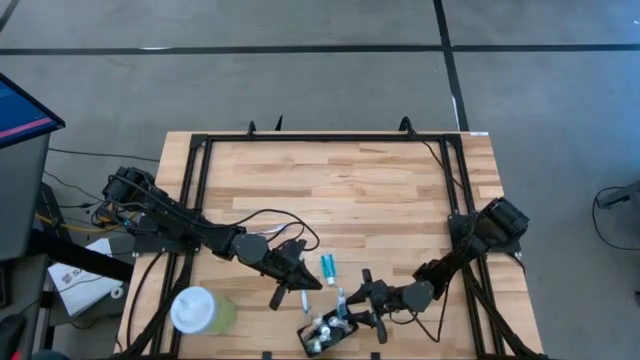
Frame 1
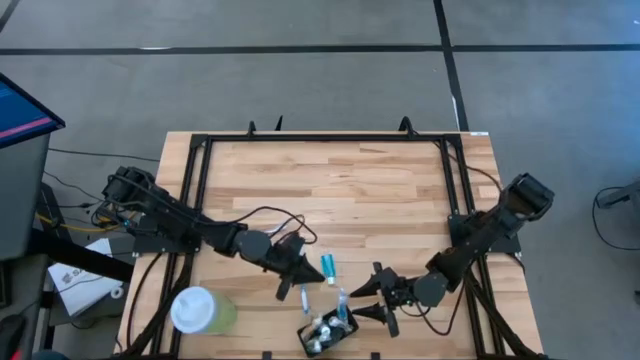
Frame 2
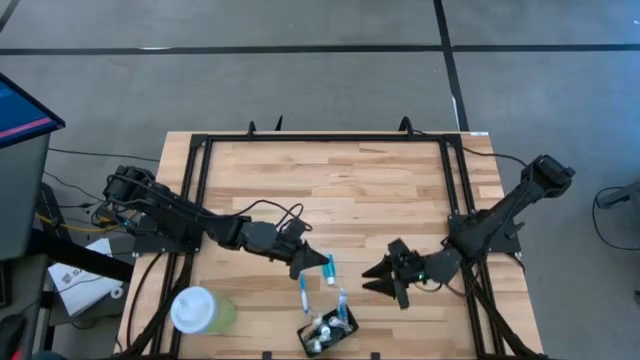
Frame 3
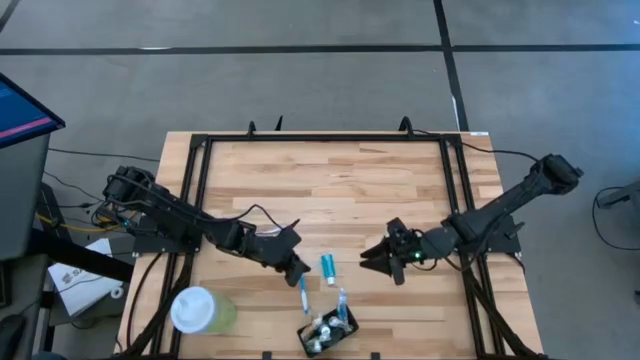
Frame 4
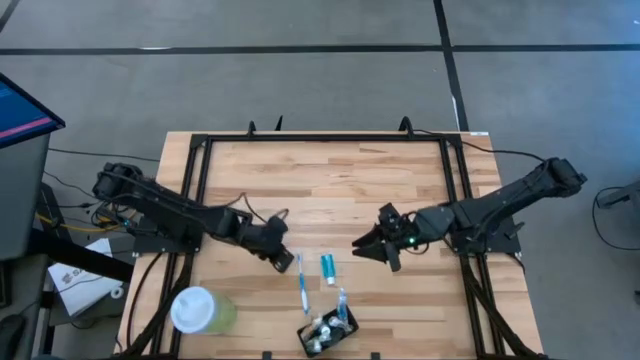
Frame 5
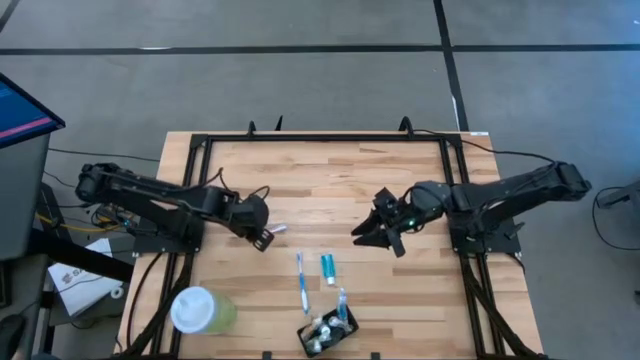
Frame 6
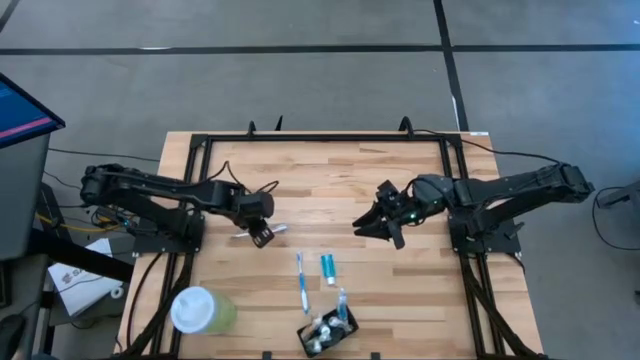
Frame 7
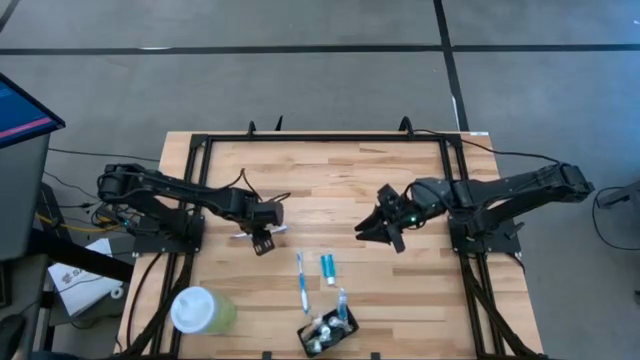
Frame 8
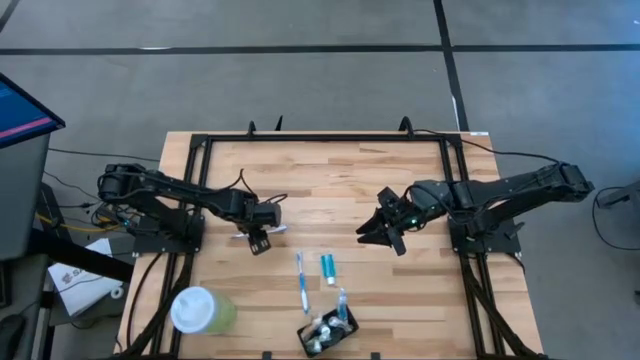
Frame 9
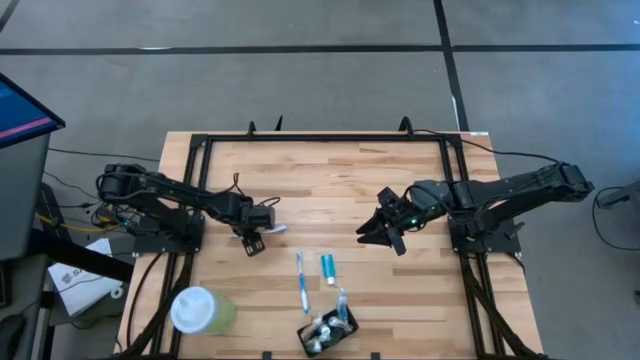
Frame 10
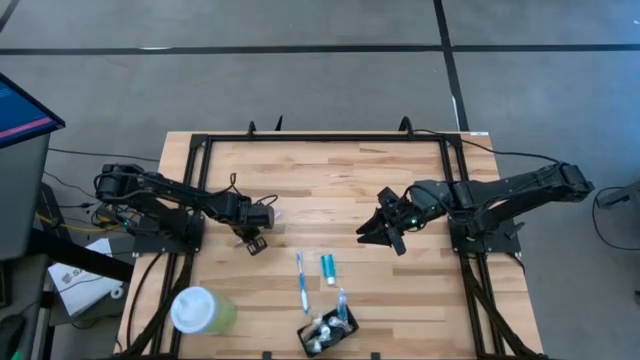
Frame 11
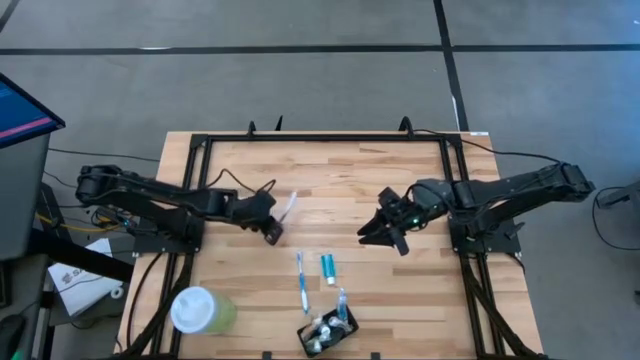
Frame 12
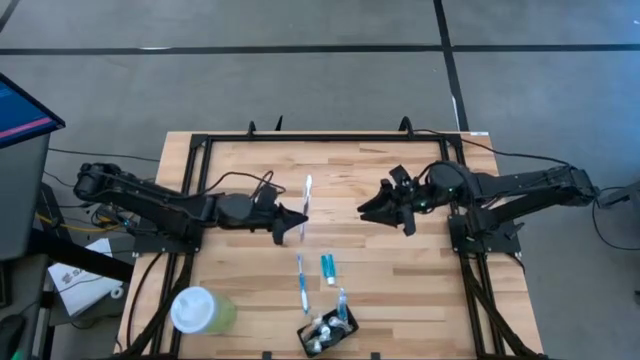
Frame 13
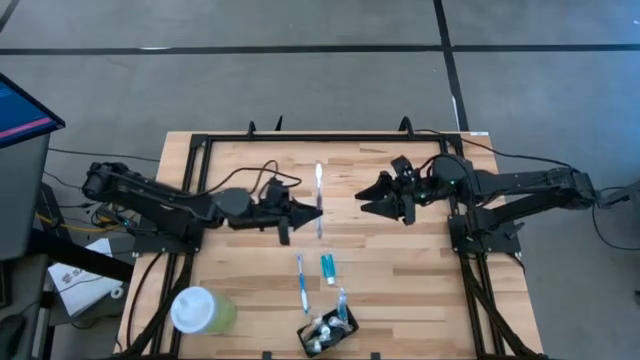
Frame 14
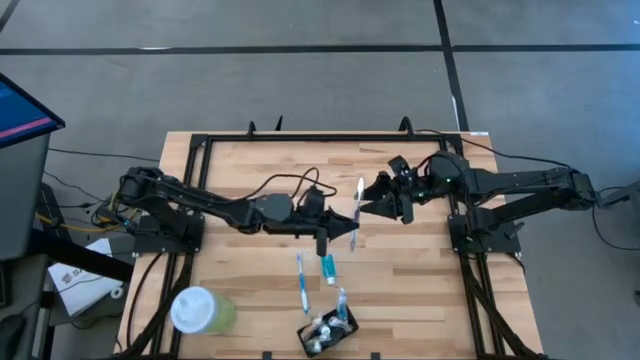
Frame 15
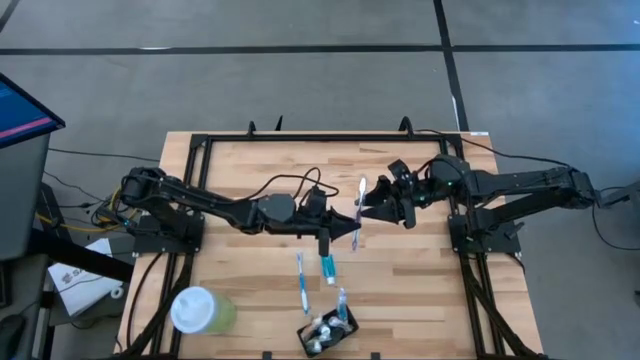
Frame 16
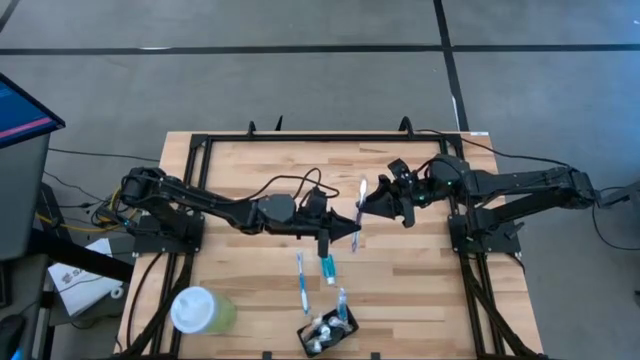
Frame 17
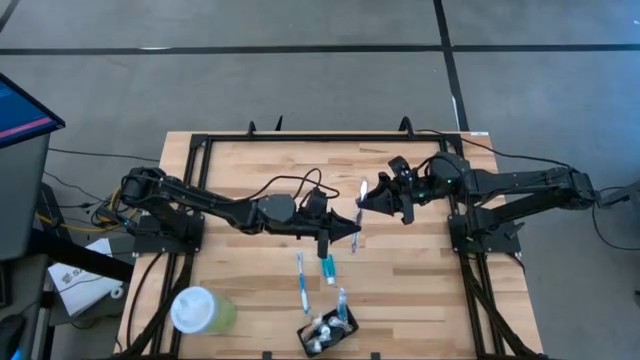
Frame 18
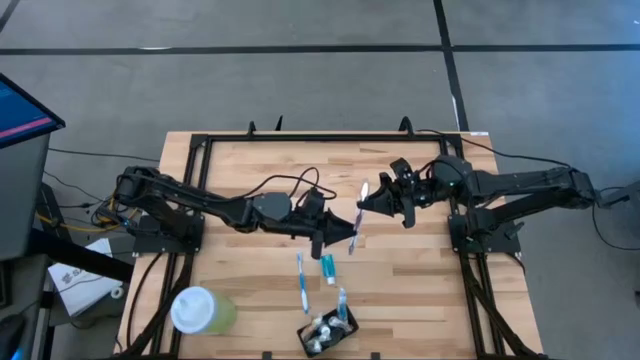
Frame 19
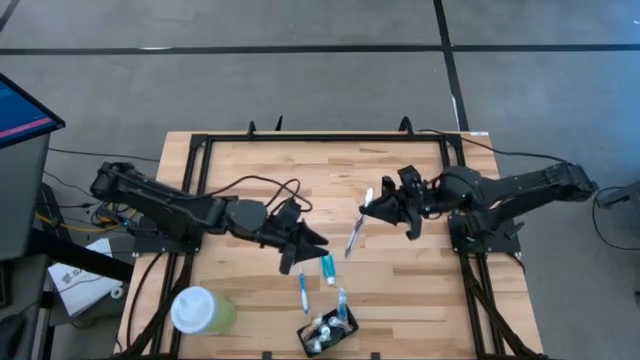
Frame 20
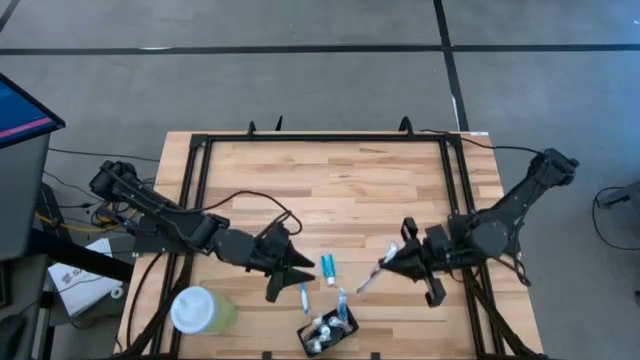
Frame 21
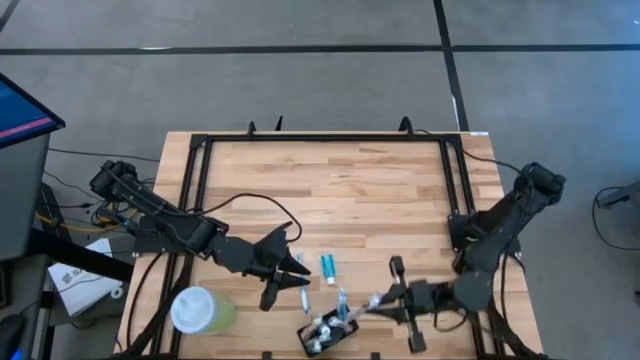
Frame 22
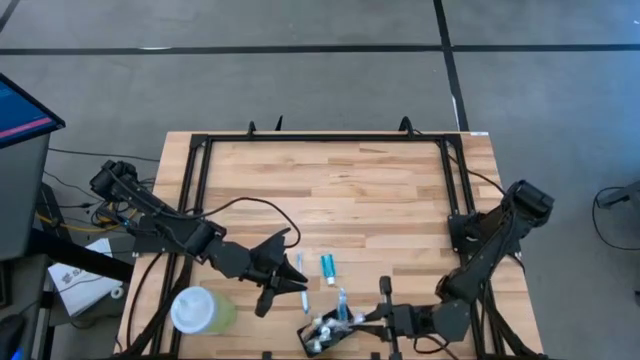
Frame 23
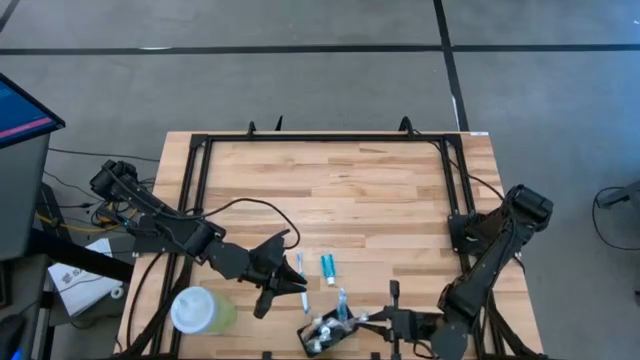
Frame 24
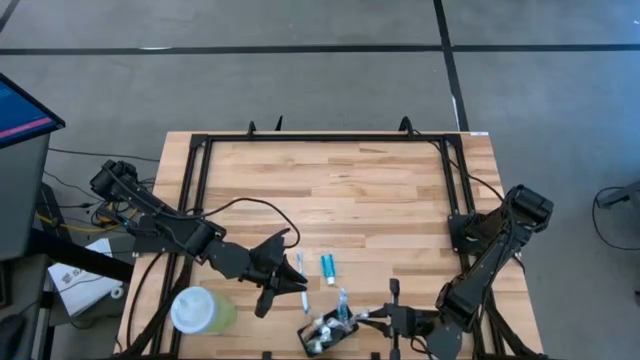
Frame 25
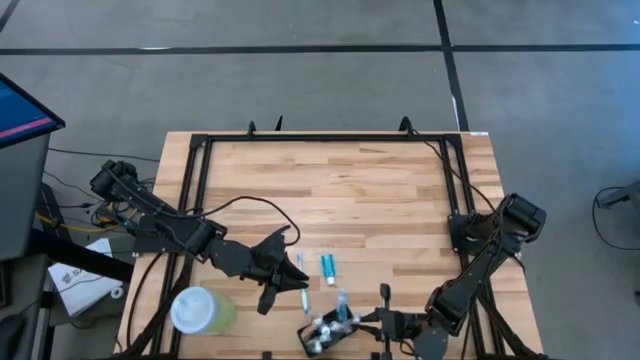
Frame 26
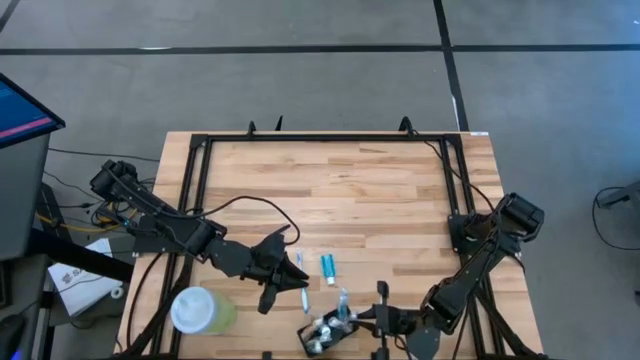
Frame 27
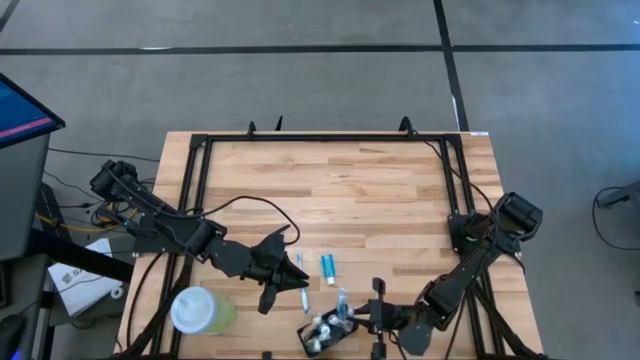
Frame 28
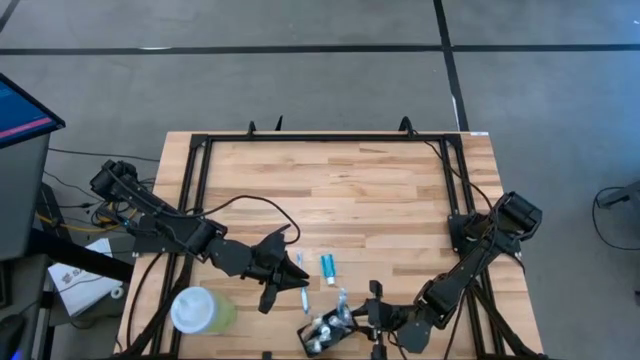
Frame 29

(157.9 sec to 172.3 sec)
Task: Pick & Place toothbrushing station
Put the violet toothbrush into the black wire organizer
